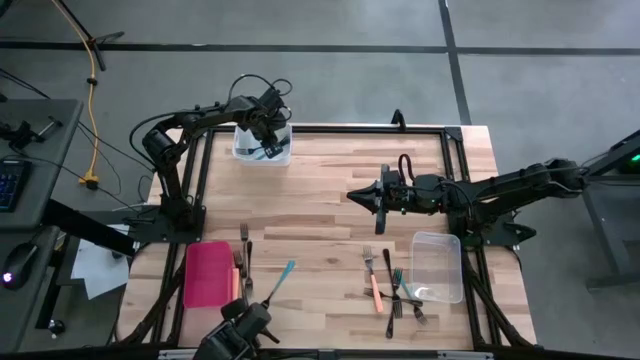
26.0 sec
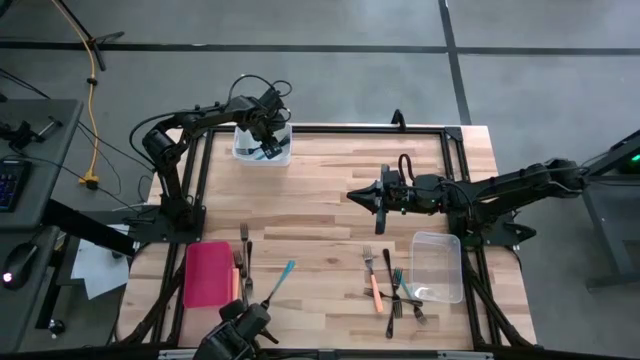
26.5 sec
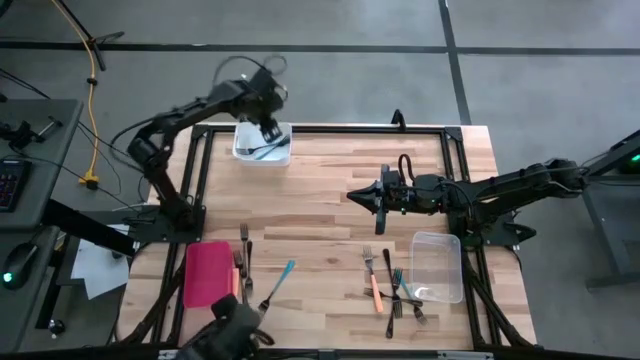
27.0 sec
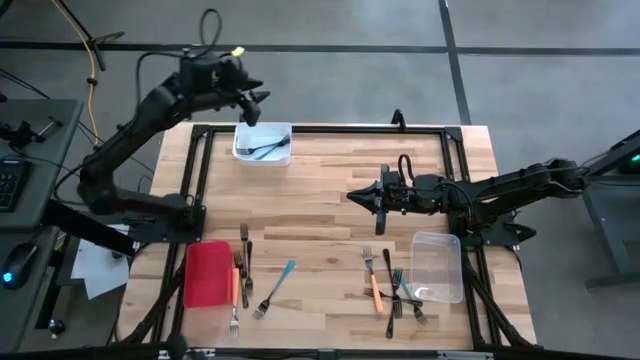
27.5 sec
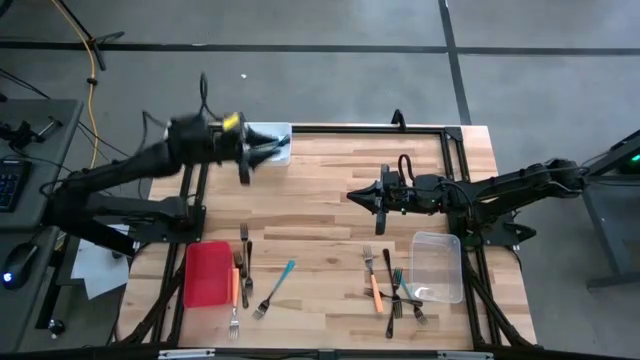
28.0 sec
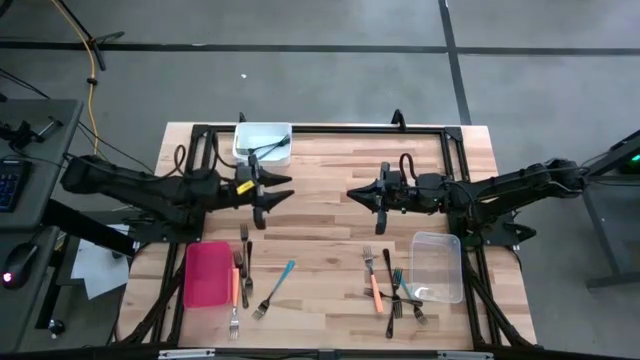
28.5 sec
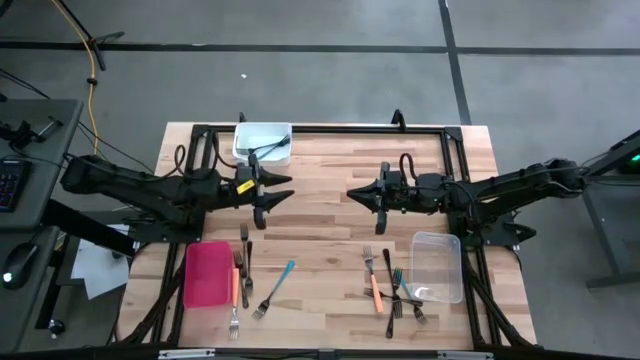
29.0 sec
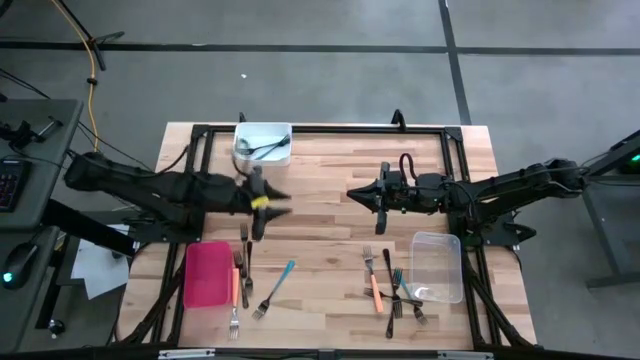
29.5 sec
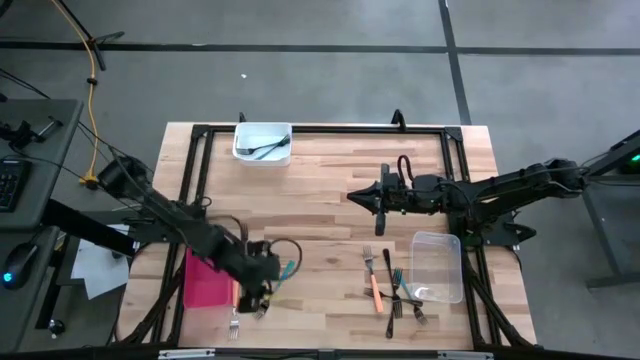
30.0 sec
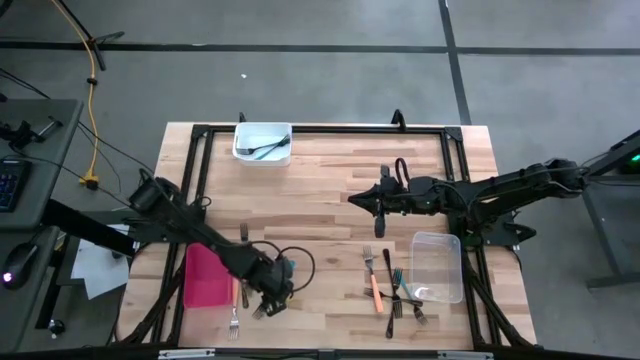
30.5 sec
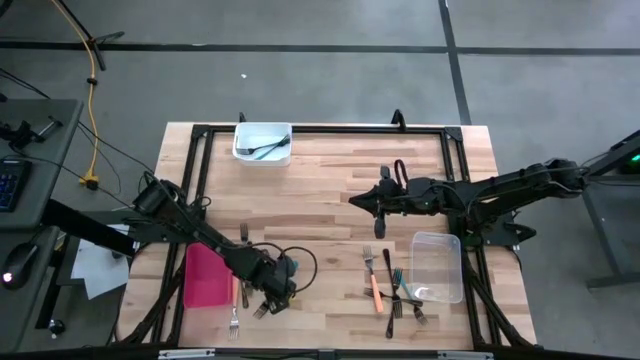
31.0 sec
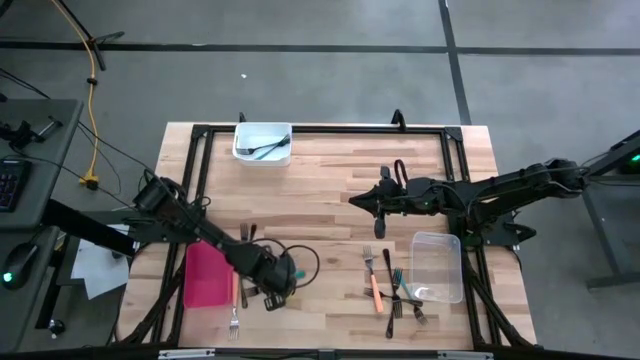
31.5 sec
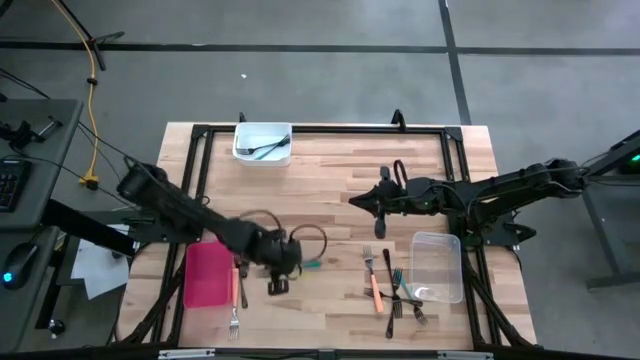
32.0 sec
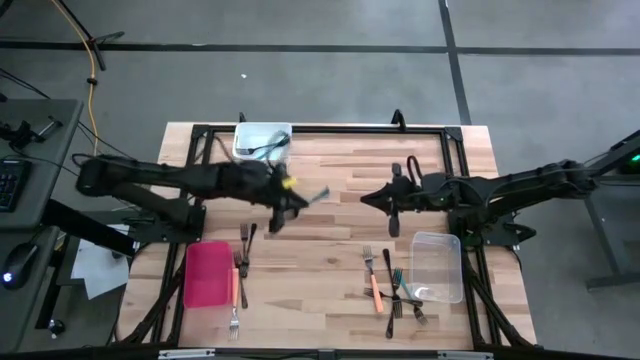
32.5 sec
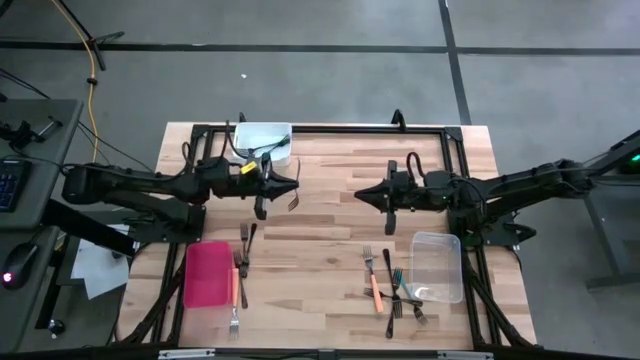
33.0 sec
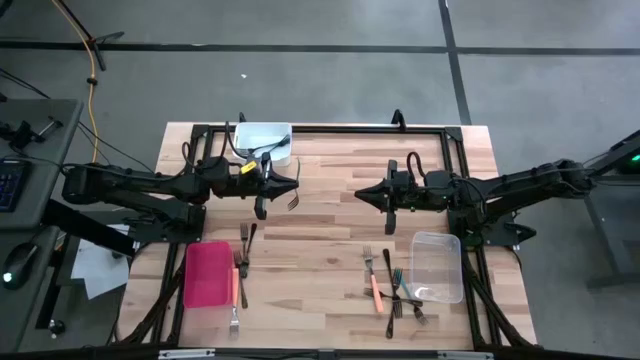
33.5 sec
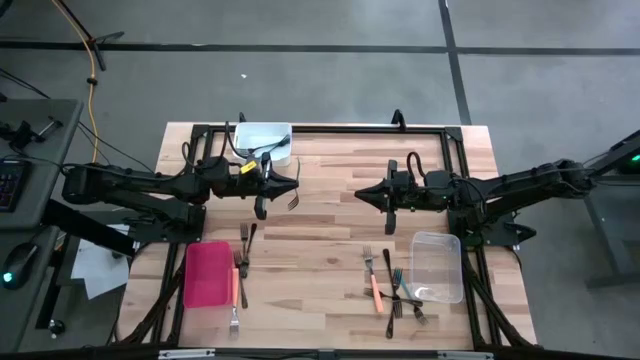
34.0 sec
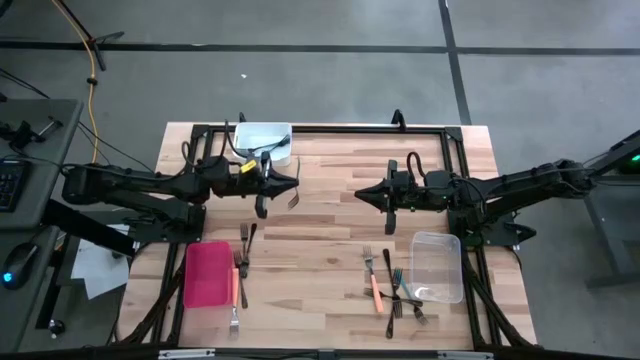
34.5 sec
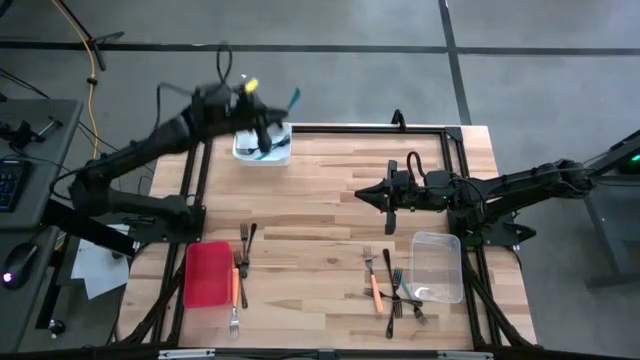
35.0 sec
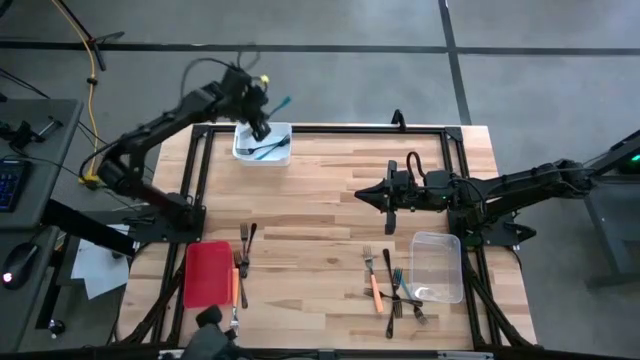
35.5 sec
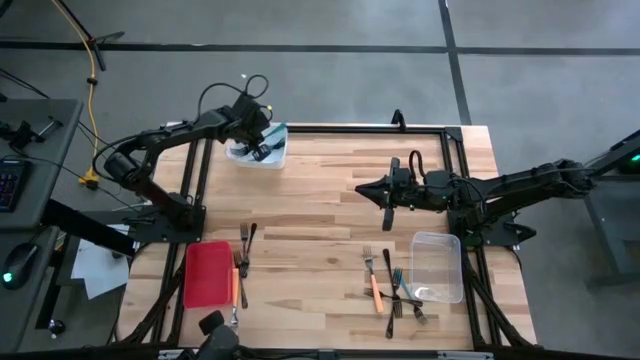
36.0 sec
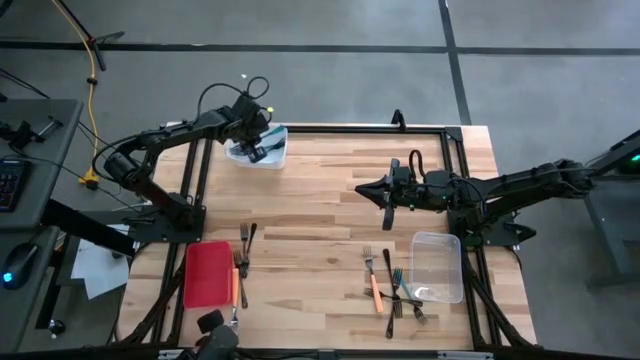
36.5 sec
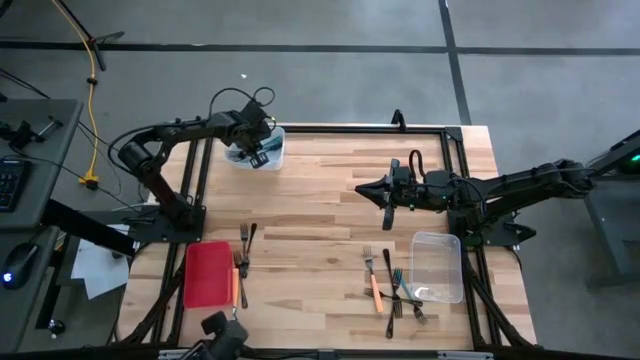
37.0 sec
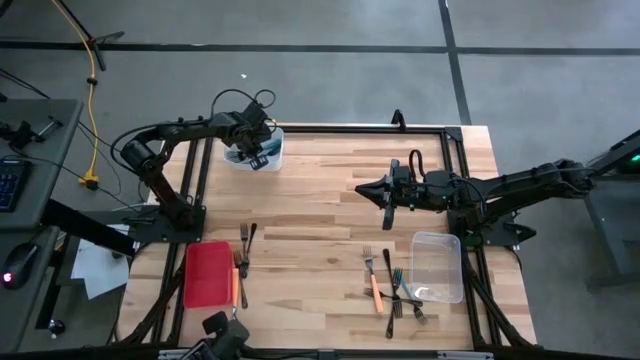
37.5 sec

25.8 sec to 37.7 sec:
Task: Sort silverware by color (type)
Put the blue fork into the white bin

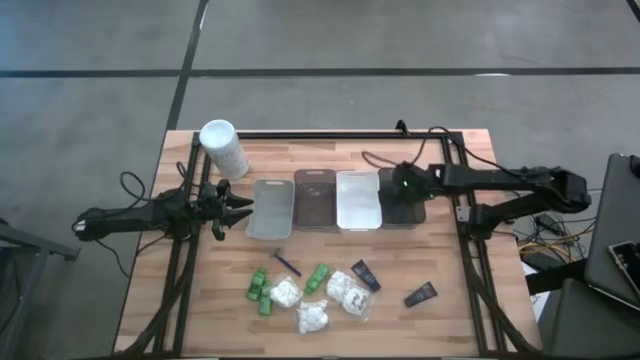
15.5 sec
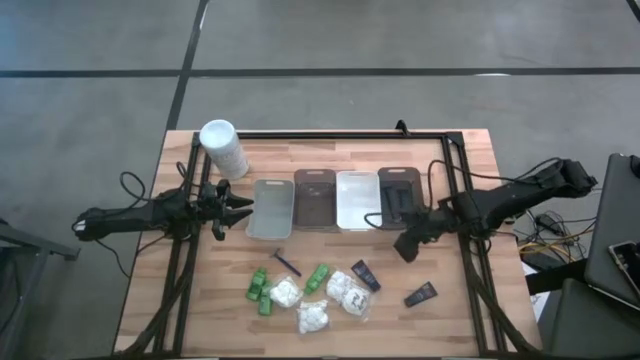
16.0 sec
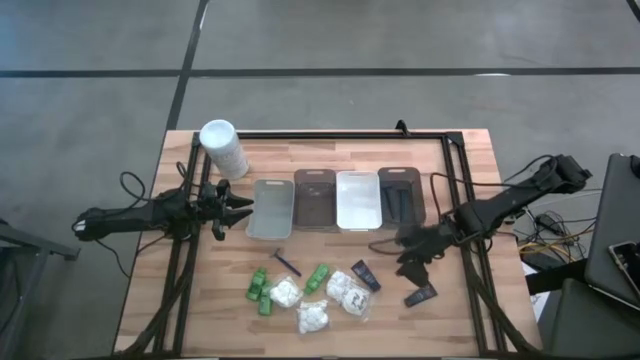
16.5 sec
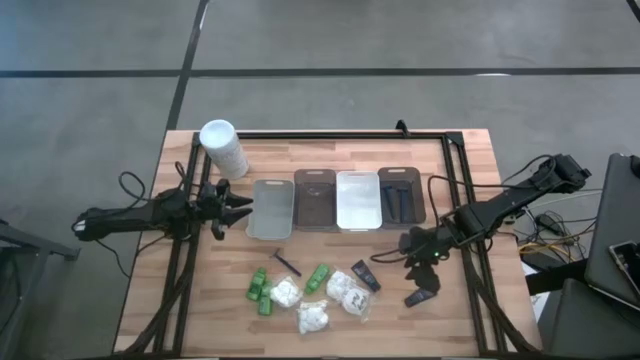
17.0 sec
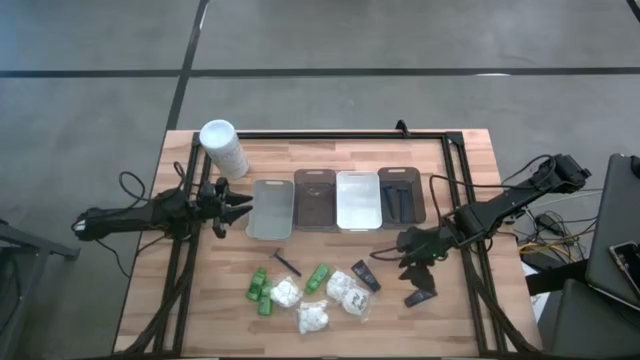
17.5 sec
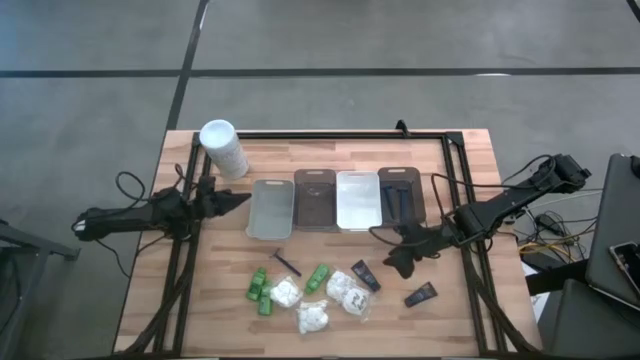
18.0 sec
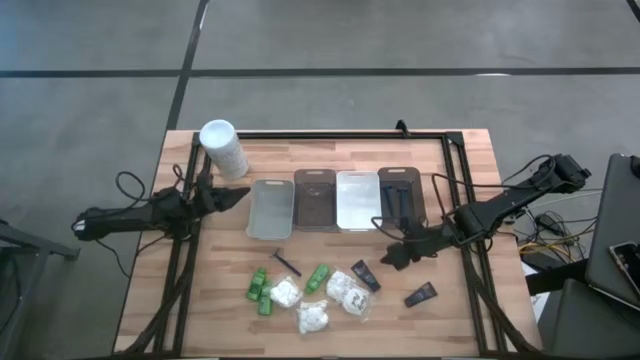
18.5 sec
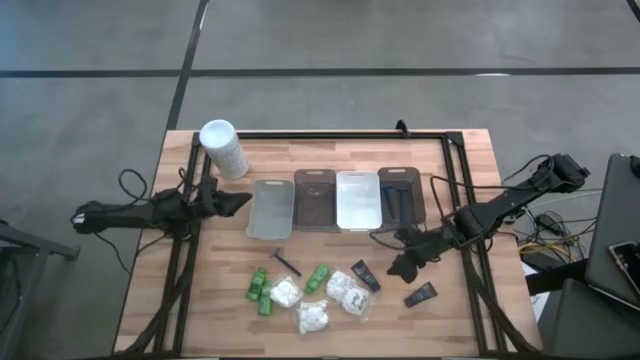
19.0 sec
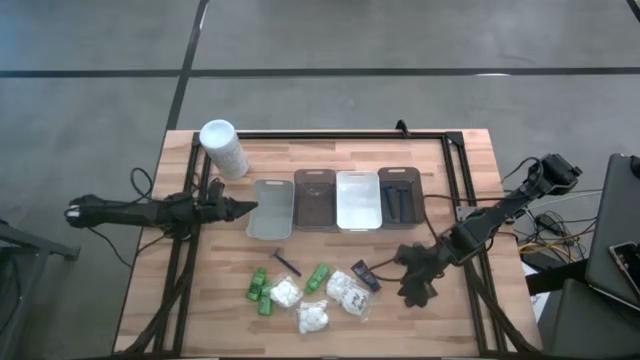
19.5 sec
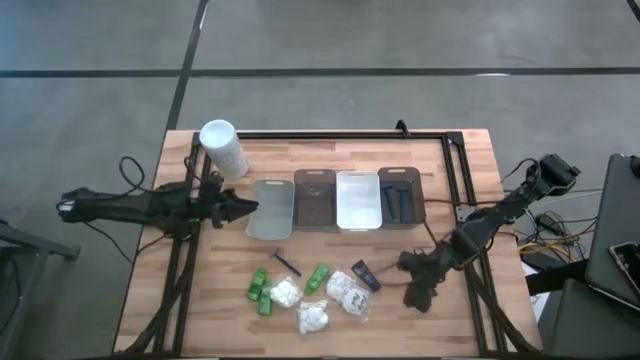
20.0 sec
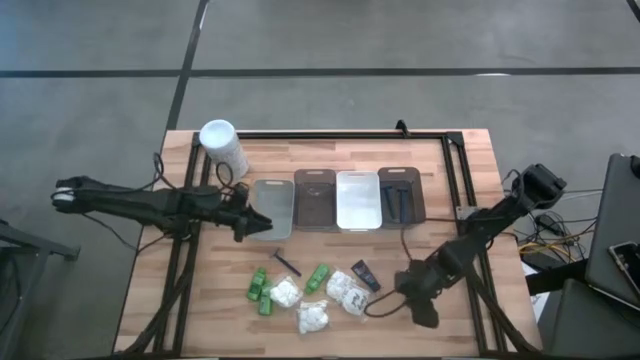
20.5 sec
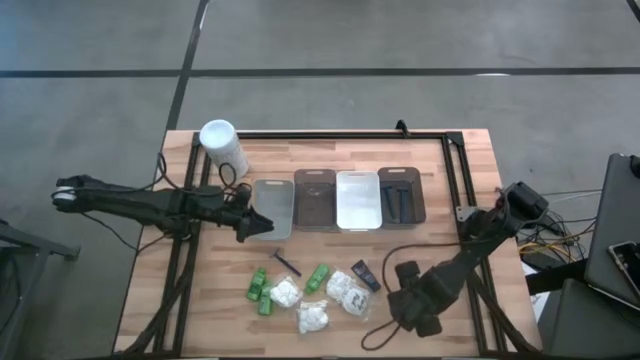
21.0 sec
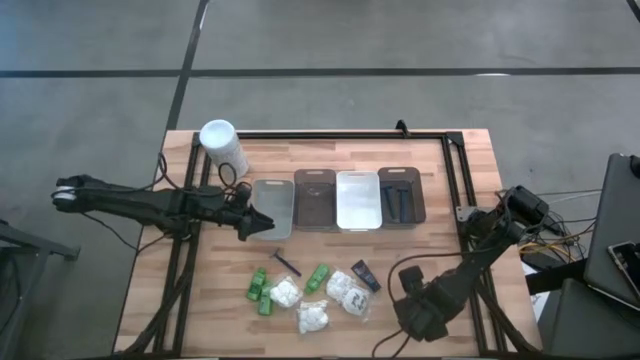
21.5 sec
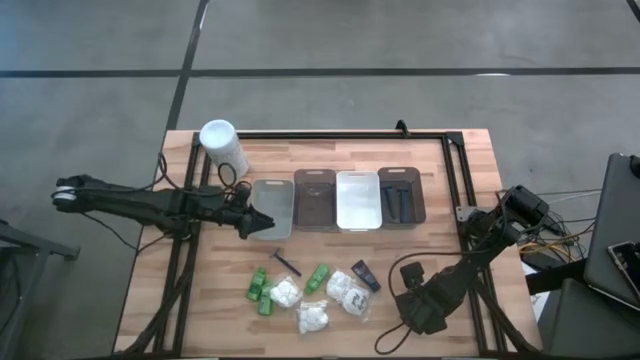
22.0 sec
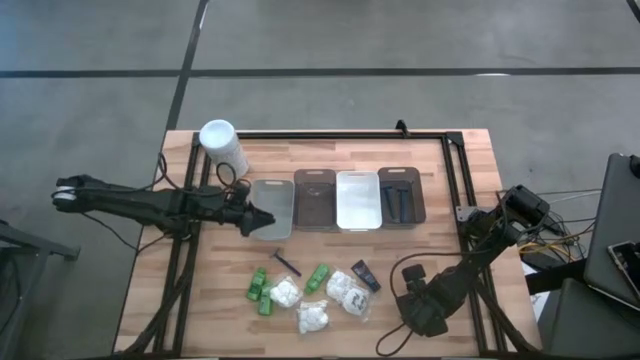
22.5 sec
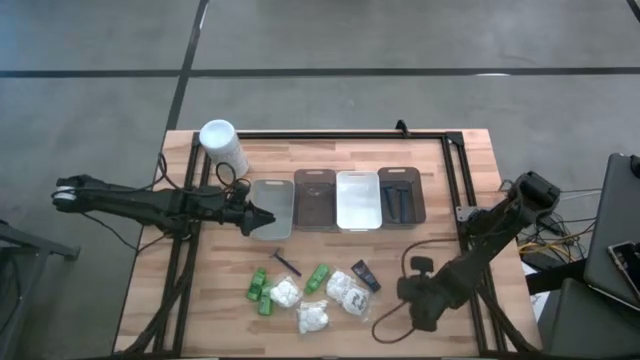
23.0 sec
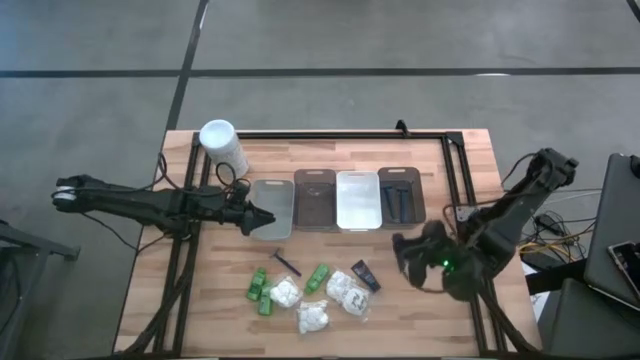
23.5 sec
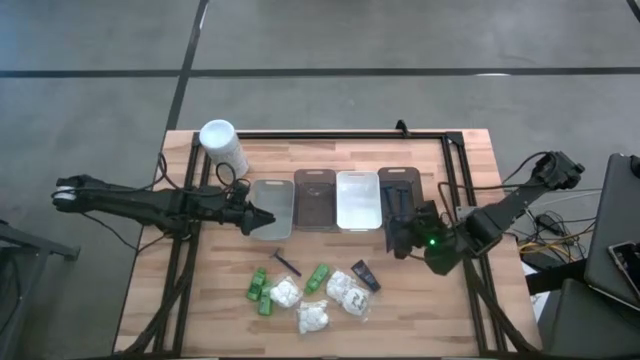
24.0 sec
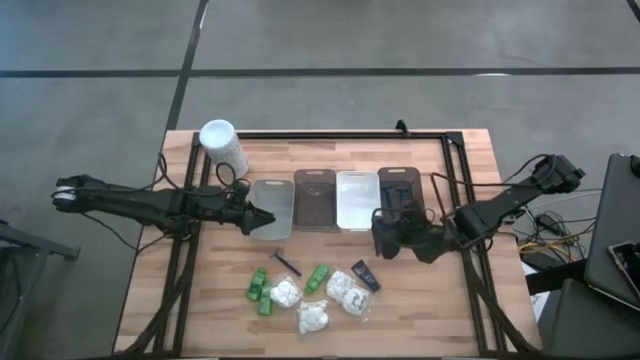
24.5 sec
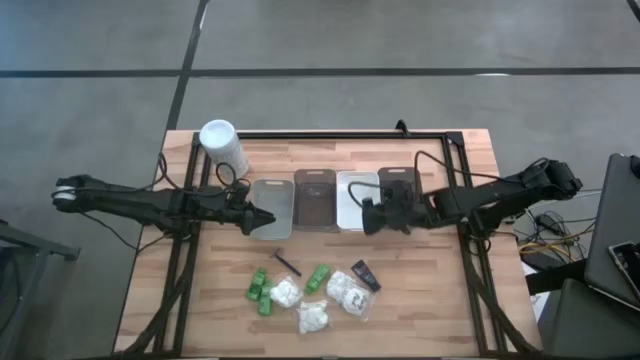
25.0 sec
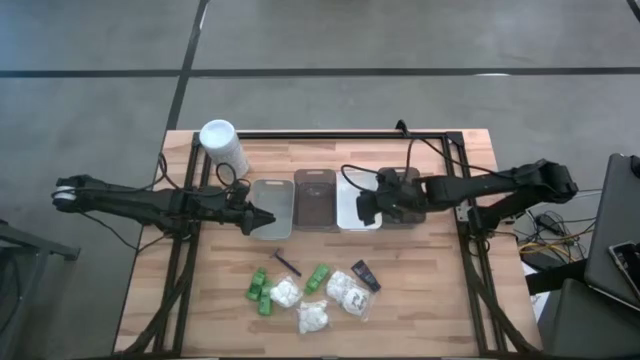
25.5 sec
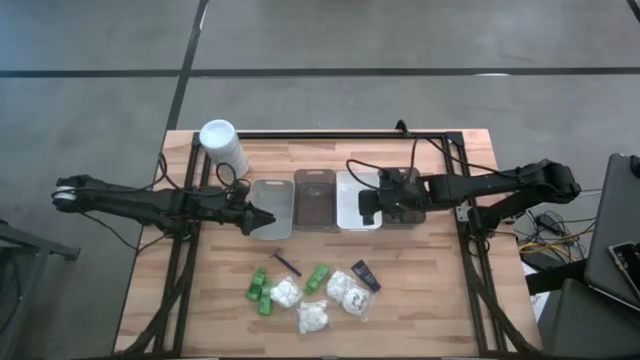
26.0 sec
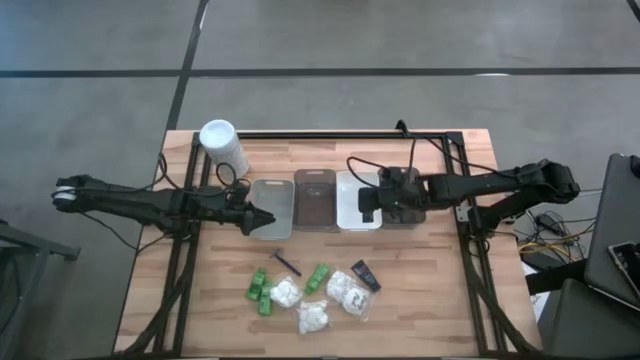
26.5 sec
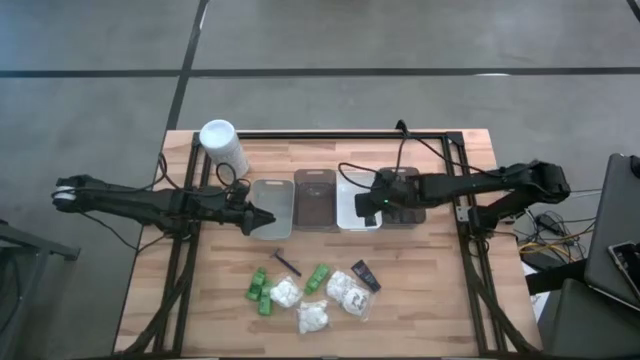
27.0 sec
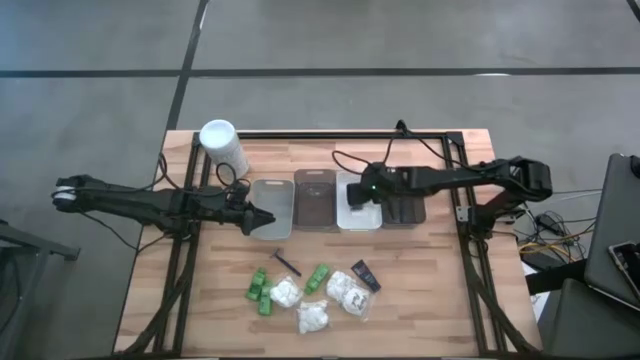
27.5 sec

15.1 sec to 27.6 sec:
Task: Pick & Place Travel size toiletries
Put the right dark blue shaving cream into the white bin
